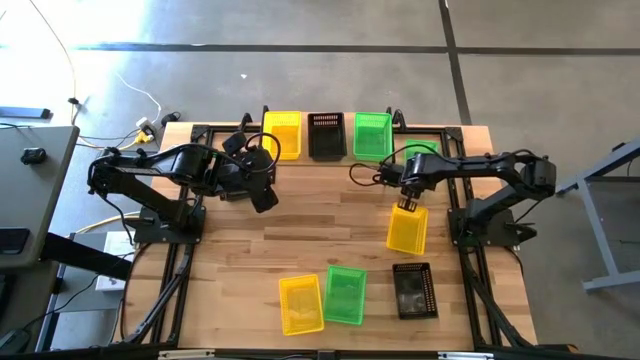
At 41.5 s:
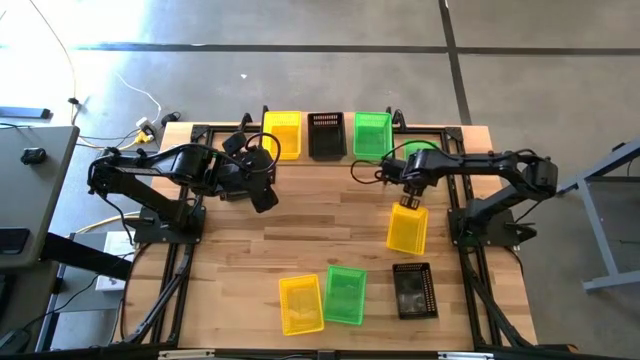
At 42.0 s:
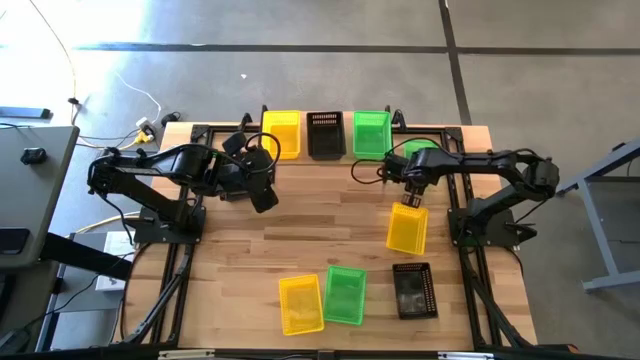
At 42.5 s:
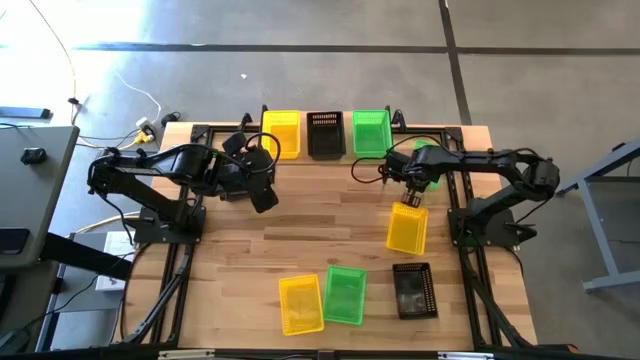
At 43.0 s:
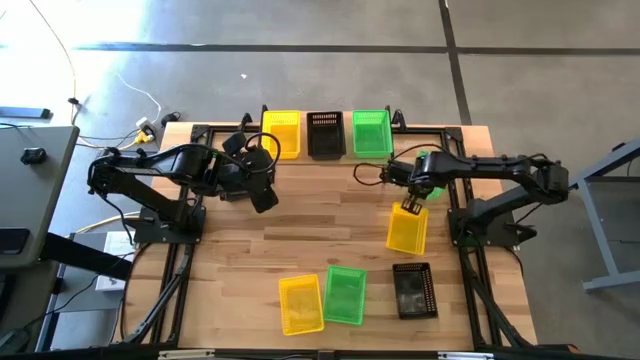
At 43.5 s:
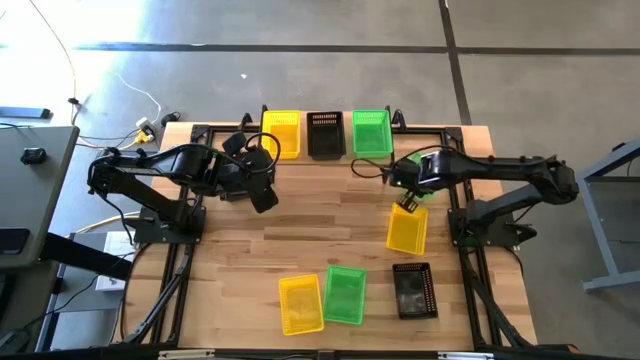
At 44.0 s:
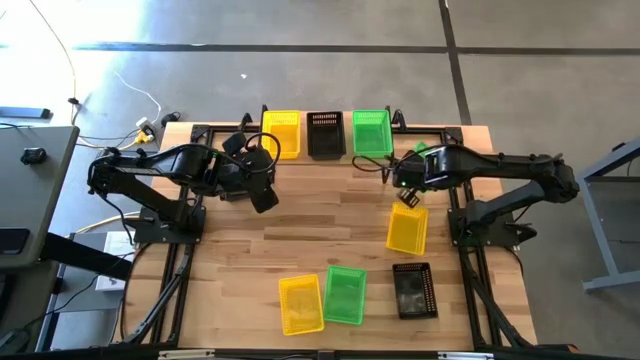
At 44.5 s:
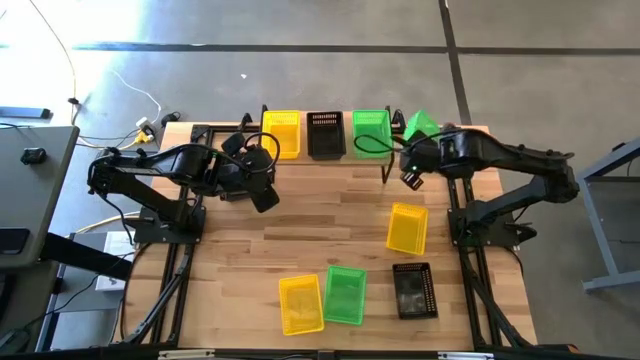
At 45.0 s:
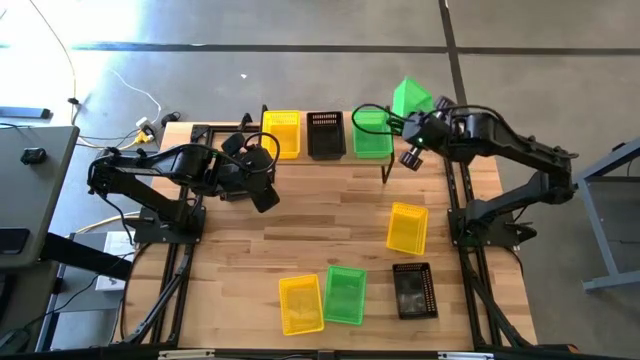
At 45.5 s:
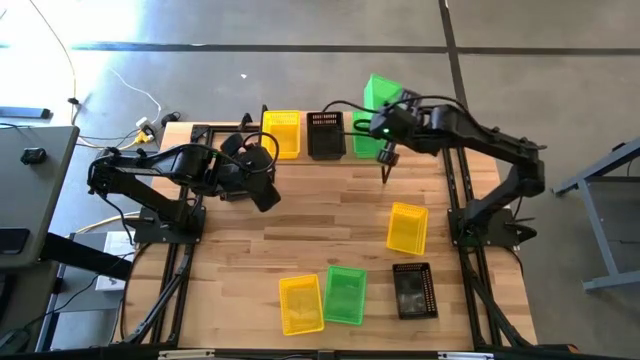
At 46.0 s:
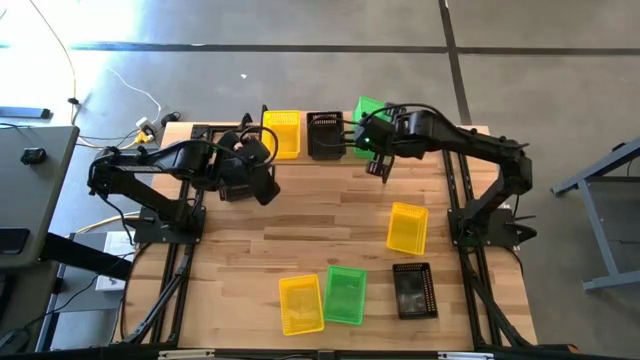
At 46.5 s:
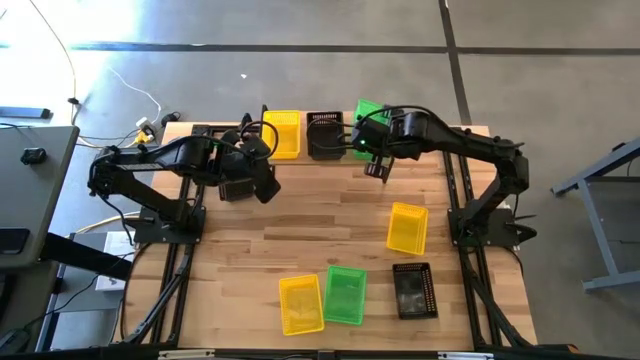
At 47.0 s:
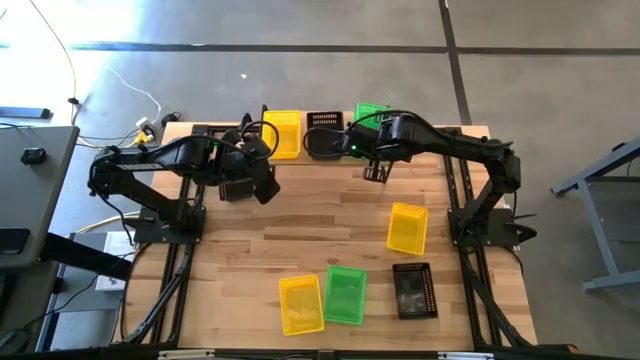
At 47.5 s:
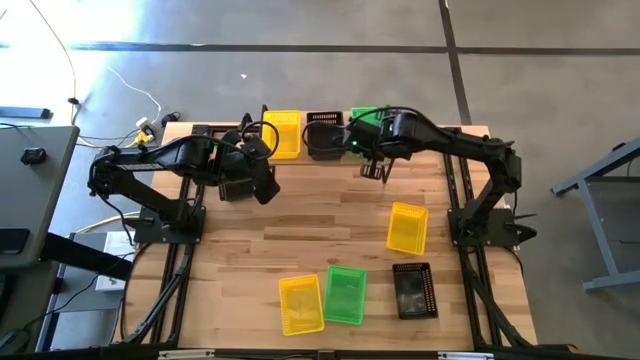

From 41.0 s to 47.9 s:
Task: Stack baskets on shelf by color
Stack the top green bin on the green bin on the shelf

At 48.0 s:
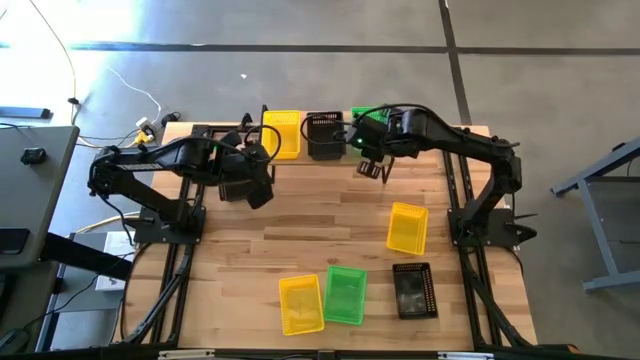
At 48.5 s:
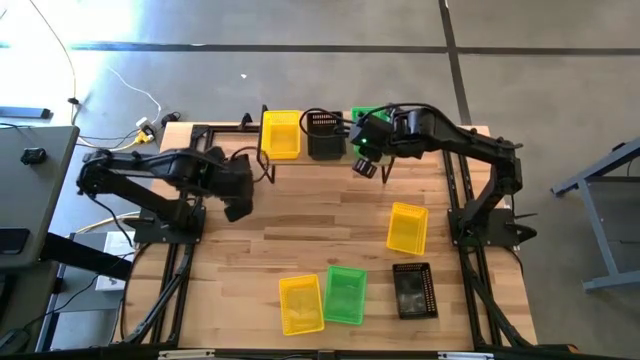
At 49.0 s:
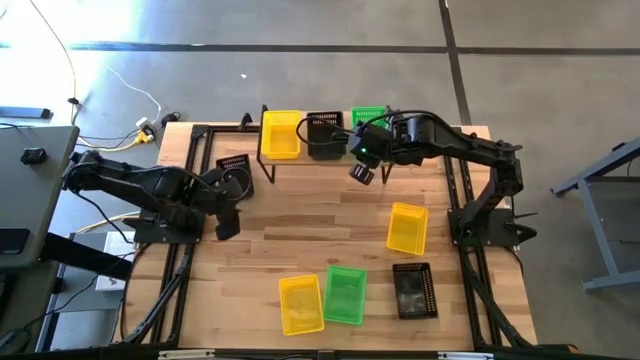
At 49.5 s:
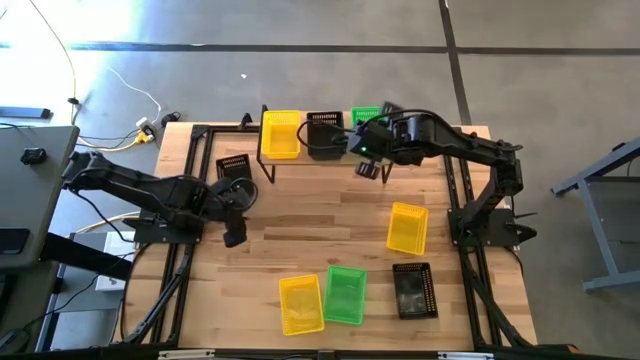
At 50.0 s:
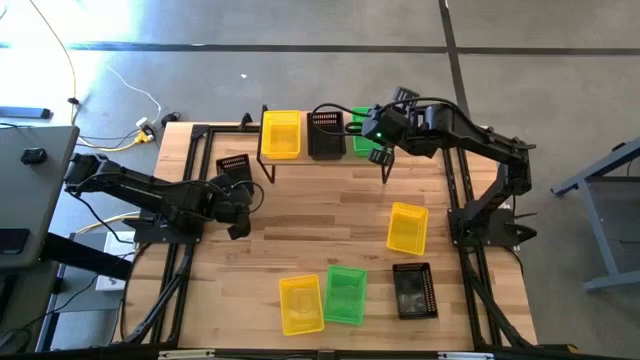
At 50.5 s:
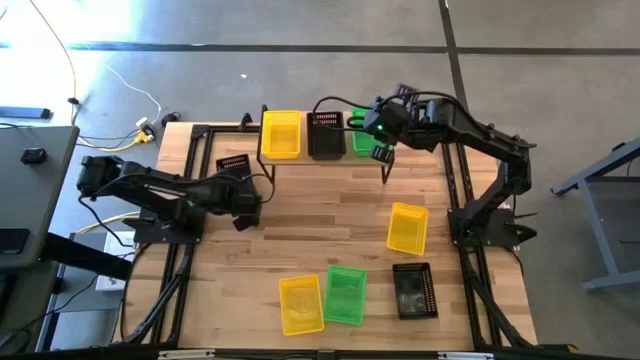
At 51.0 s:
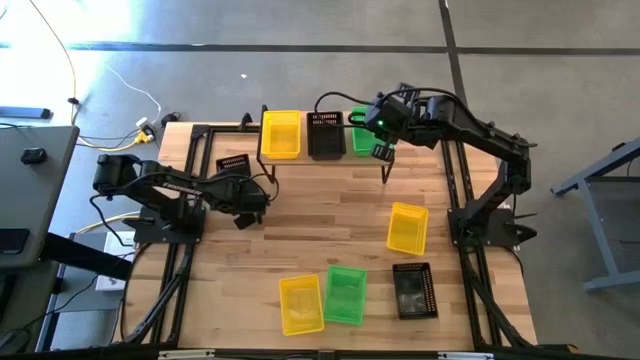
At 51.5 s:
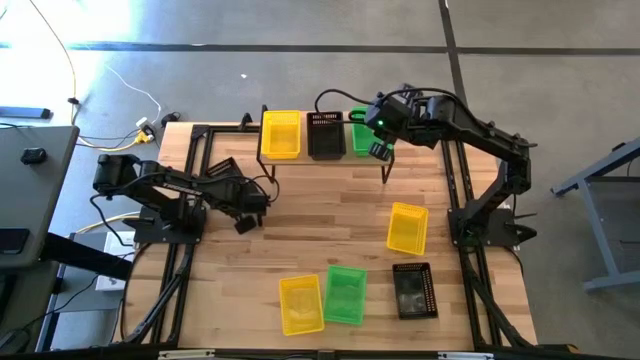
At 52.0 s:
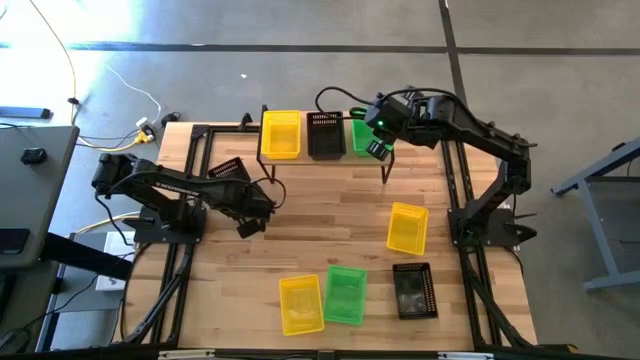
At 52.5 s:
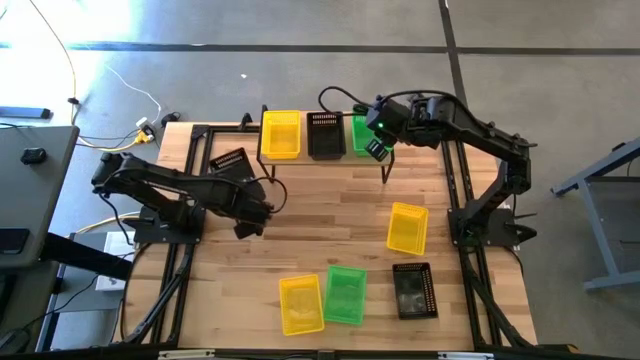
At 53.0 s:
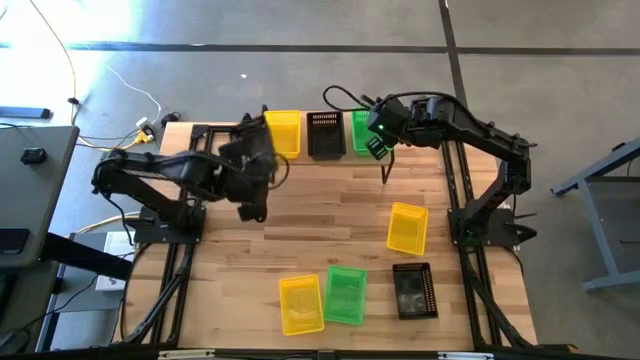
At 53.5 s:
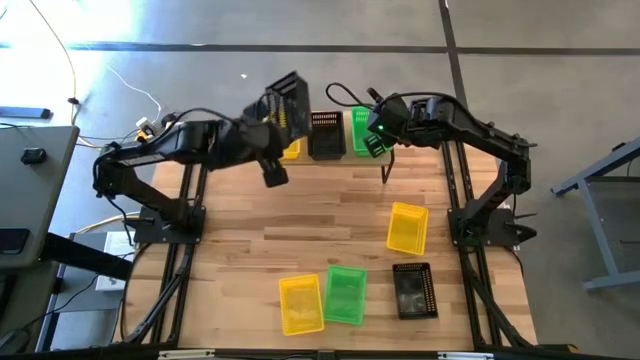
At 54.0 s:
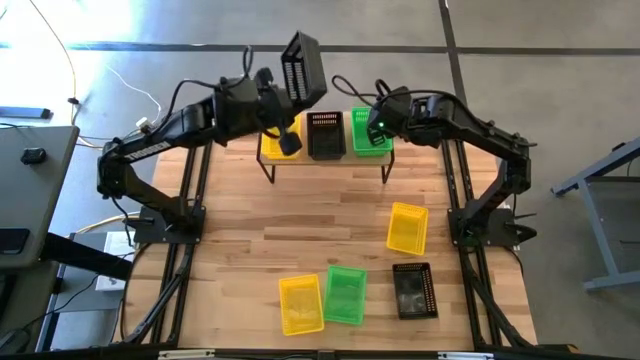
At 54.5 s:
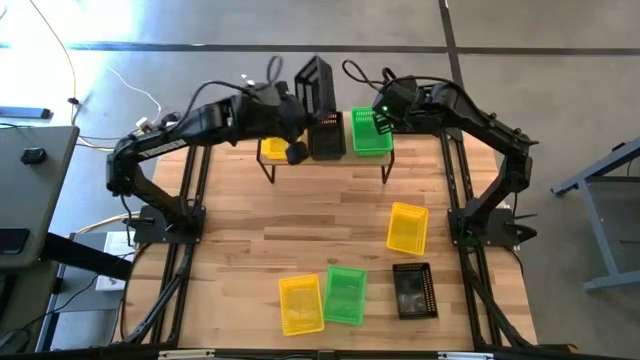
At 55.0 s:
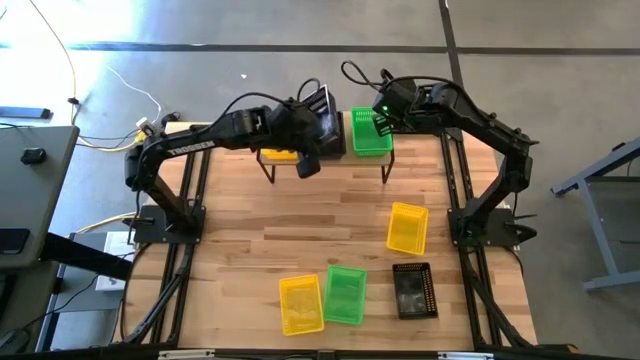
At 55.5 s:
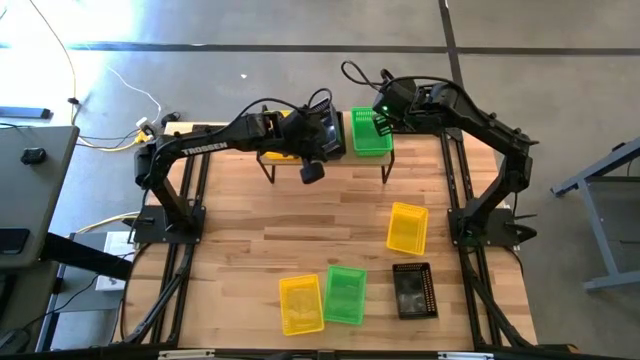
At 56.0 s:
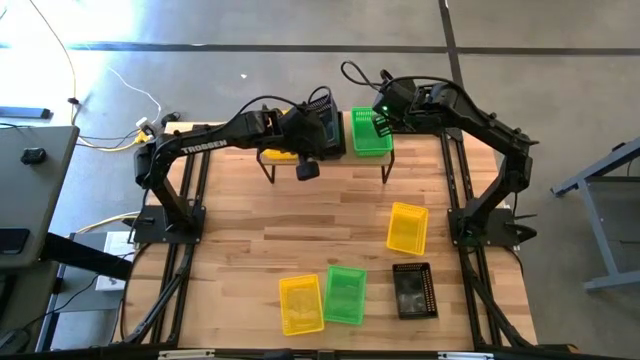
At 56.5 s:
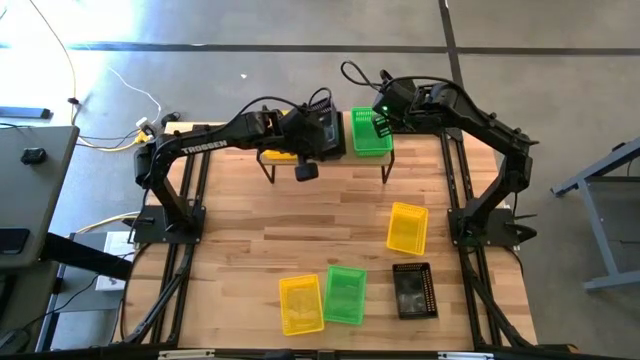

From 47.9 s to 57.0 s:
Stack the top black bin on the black bin on the shelf
